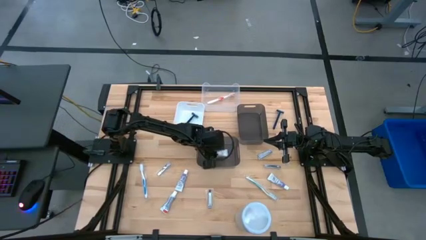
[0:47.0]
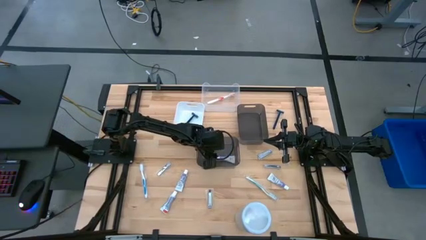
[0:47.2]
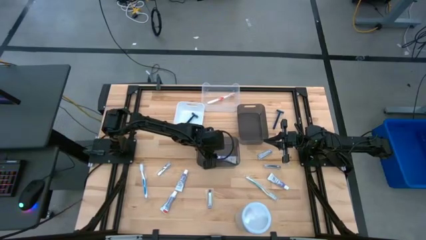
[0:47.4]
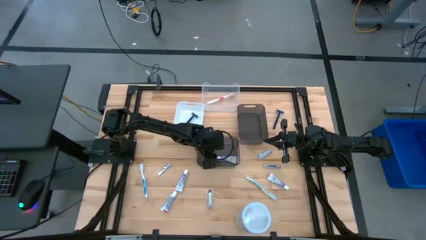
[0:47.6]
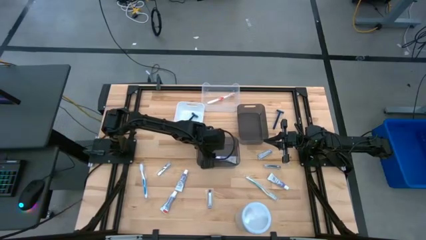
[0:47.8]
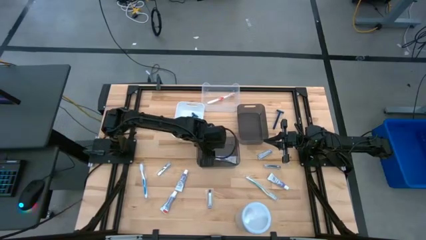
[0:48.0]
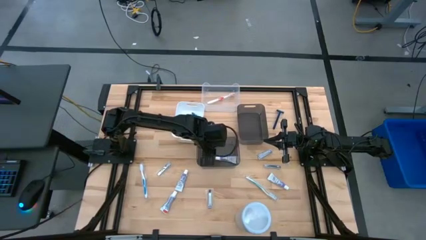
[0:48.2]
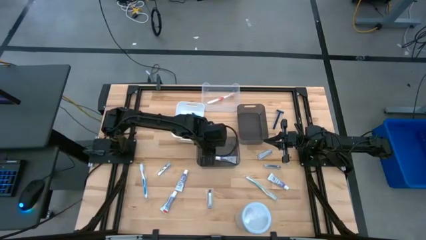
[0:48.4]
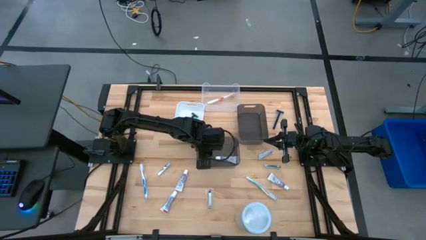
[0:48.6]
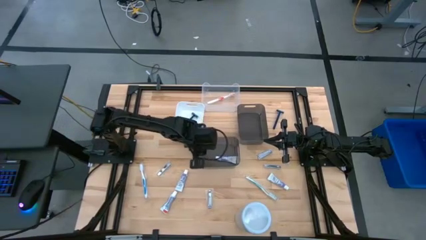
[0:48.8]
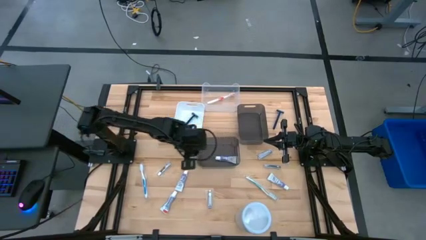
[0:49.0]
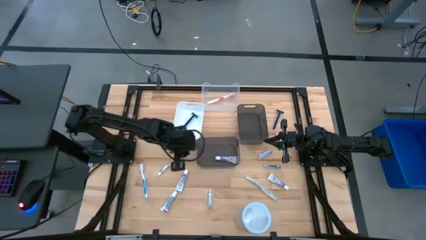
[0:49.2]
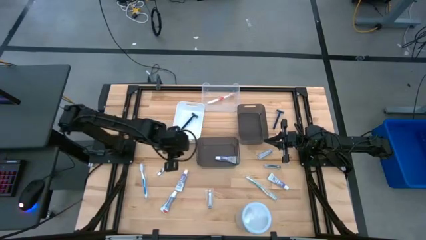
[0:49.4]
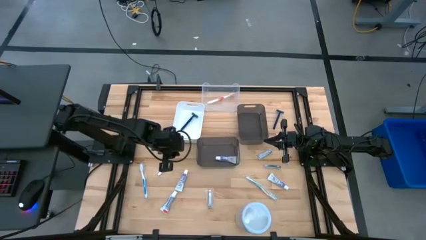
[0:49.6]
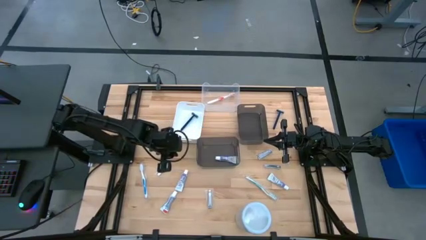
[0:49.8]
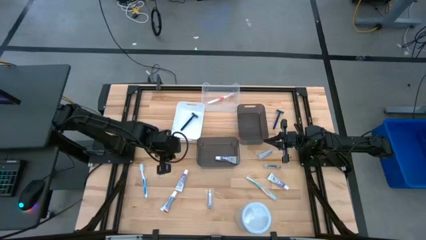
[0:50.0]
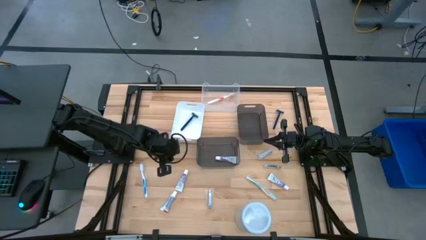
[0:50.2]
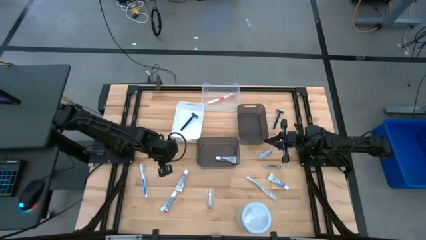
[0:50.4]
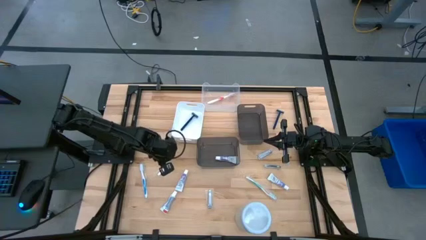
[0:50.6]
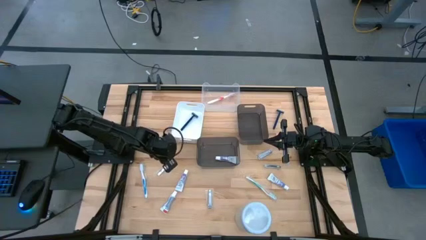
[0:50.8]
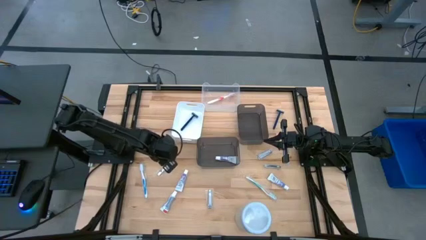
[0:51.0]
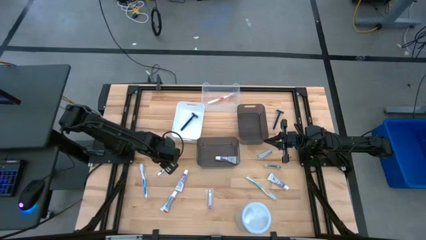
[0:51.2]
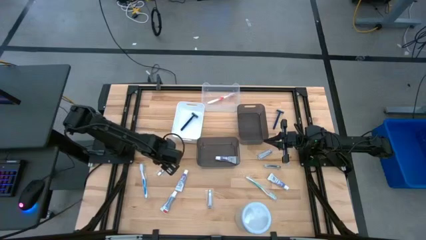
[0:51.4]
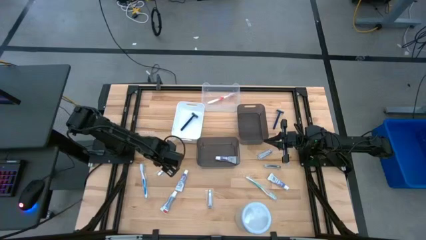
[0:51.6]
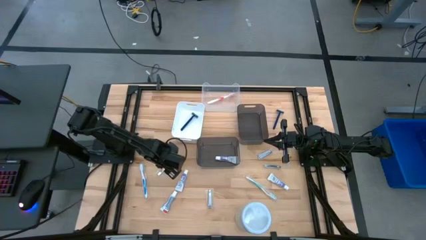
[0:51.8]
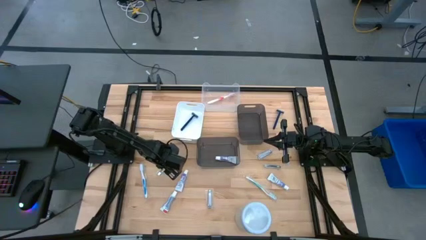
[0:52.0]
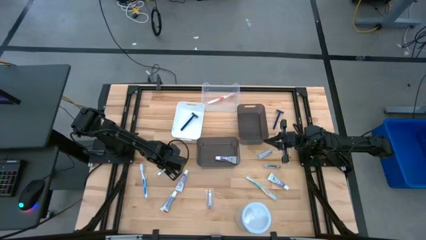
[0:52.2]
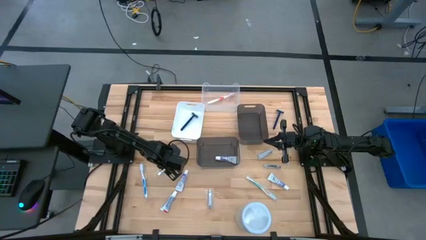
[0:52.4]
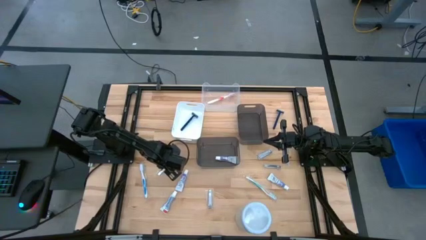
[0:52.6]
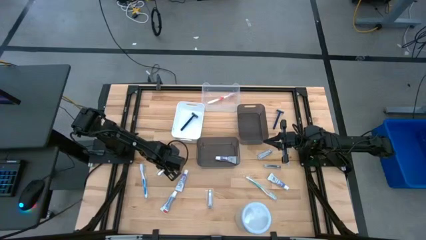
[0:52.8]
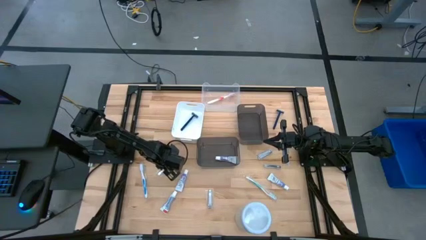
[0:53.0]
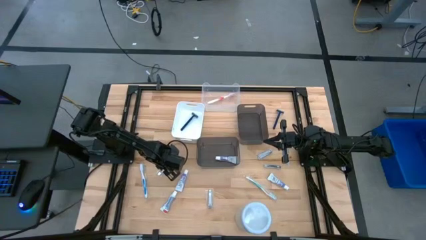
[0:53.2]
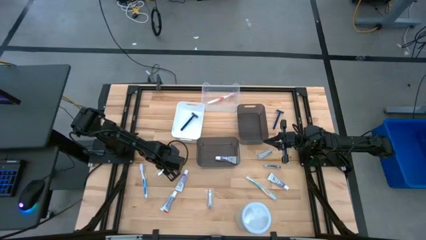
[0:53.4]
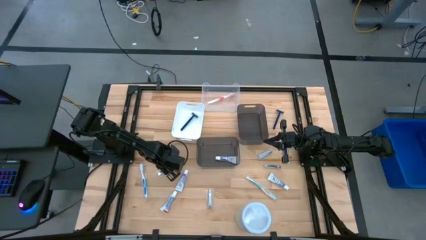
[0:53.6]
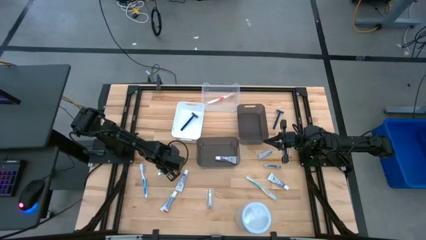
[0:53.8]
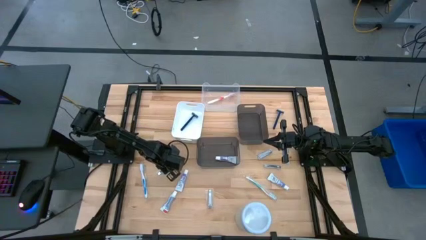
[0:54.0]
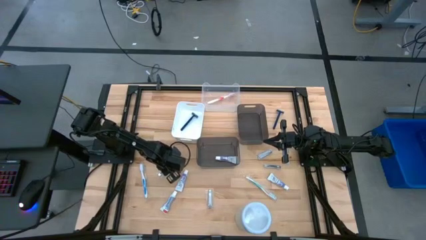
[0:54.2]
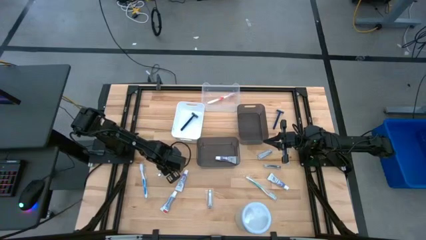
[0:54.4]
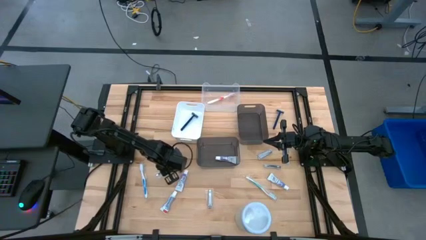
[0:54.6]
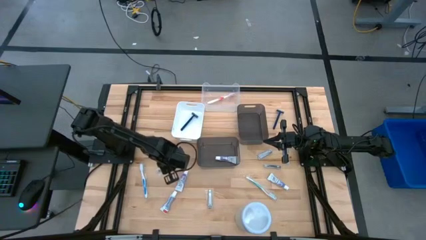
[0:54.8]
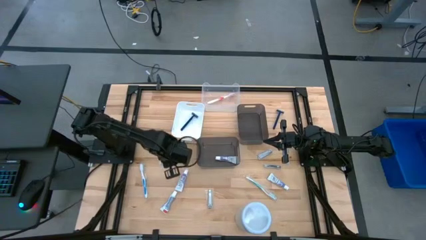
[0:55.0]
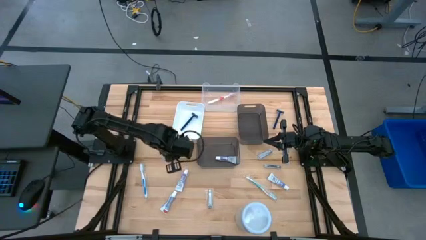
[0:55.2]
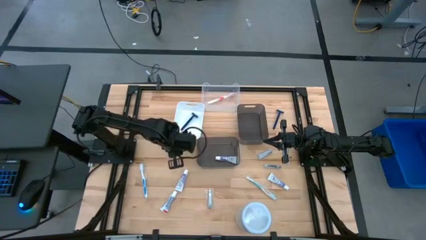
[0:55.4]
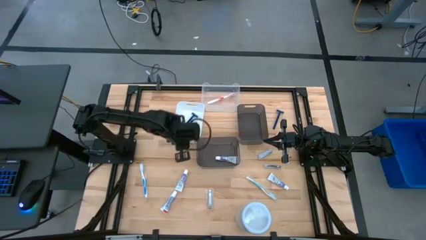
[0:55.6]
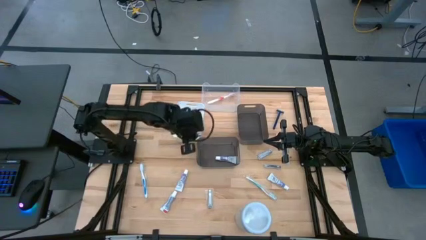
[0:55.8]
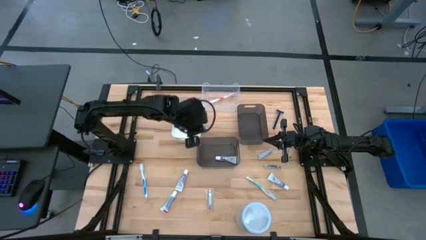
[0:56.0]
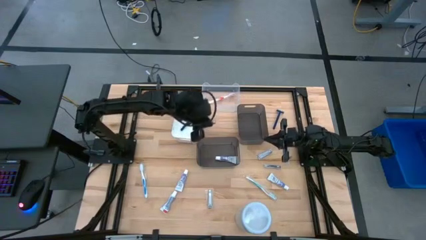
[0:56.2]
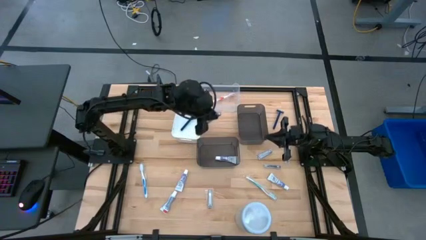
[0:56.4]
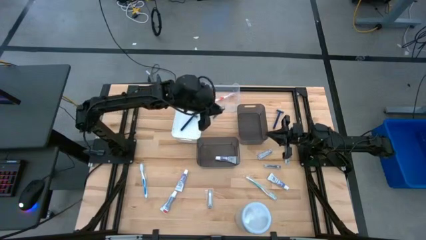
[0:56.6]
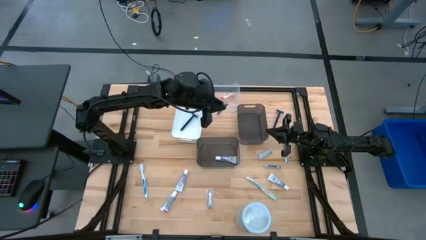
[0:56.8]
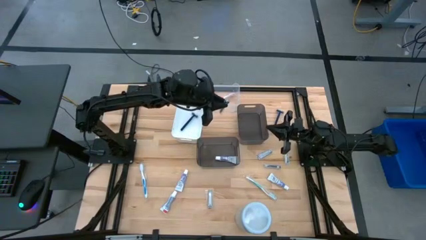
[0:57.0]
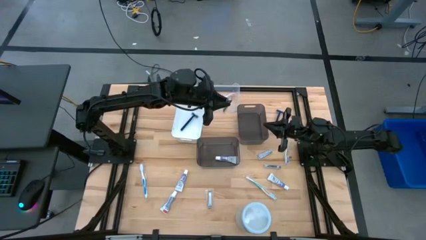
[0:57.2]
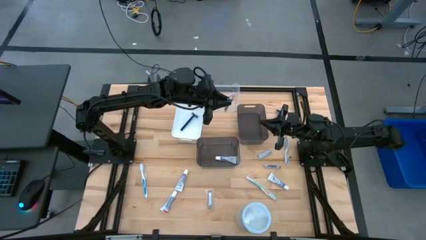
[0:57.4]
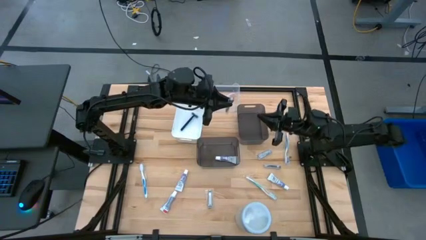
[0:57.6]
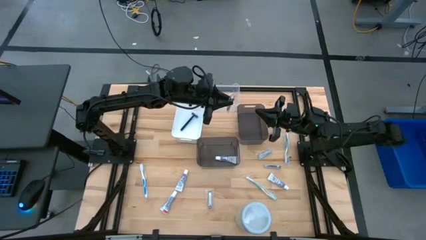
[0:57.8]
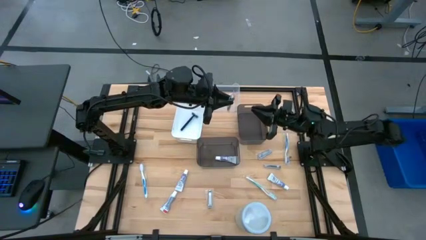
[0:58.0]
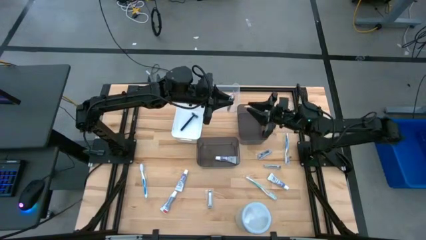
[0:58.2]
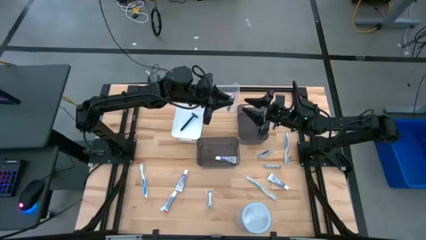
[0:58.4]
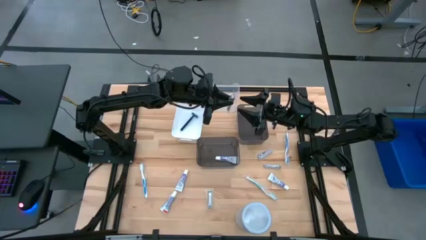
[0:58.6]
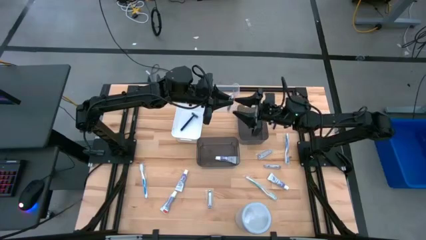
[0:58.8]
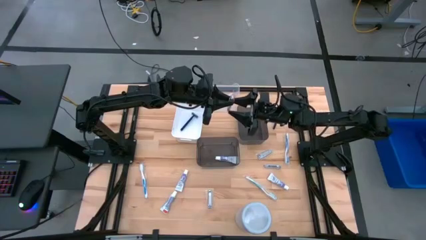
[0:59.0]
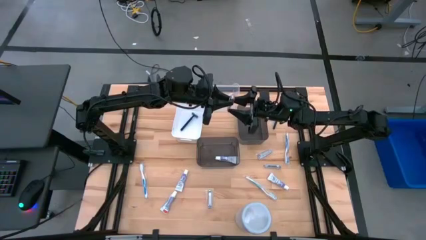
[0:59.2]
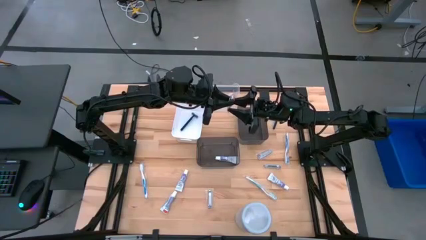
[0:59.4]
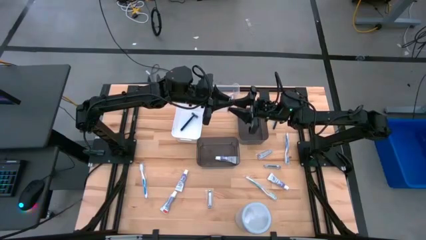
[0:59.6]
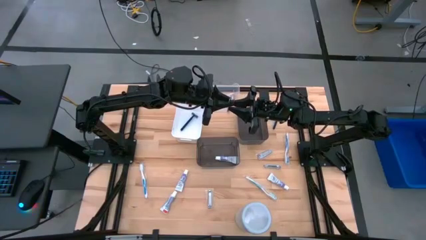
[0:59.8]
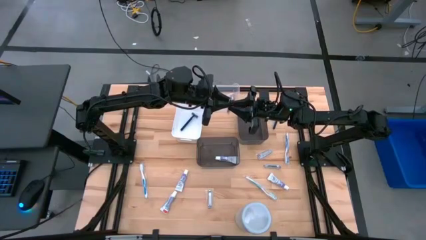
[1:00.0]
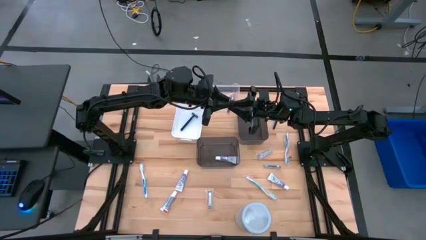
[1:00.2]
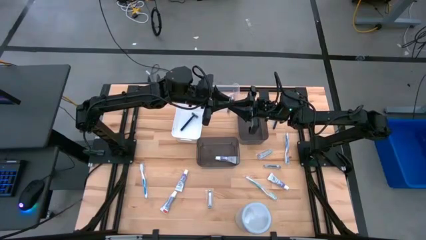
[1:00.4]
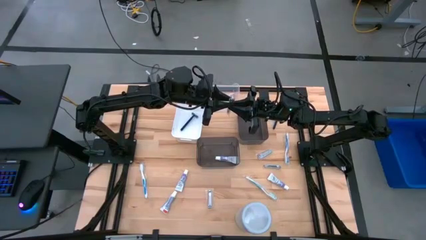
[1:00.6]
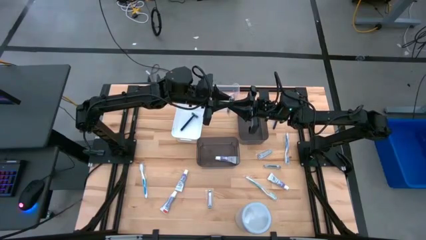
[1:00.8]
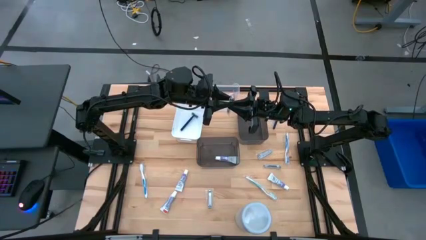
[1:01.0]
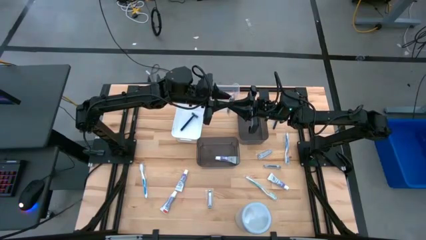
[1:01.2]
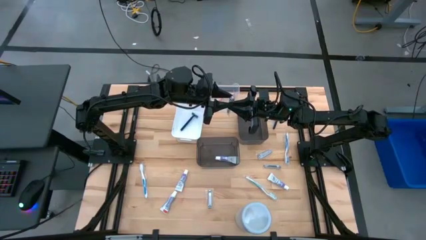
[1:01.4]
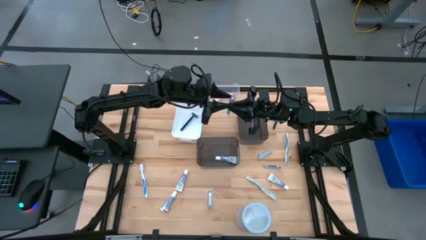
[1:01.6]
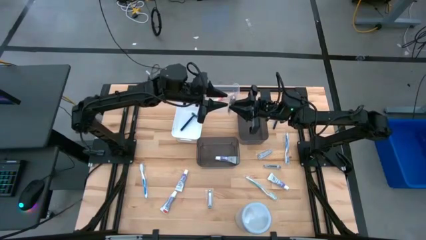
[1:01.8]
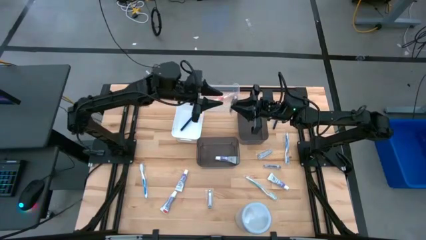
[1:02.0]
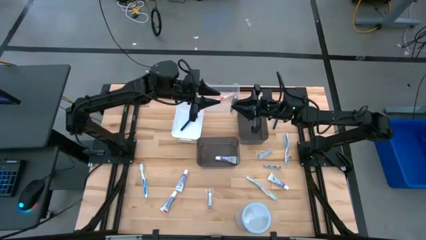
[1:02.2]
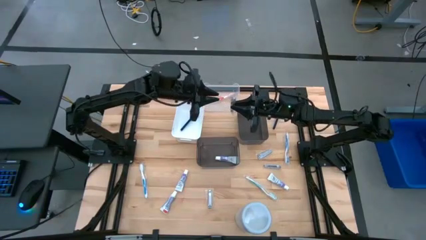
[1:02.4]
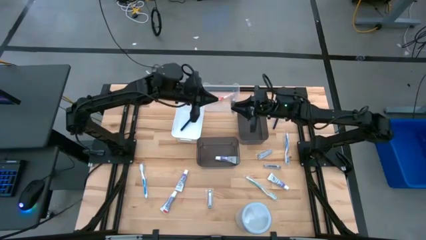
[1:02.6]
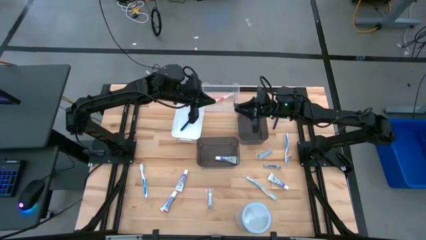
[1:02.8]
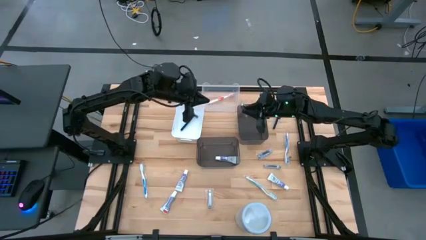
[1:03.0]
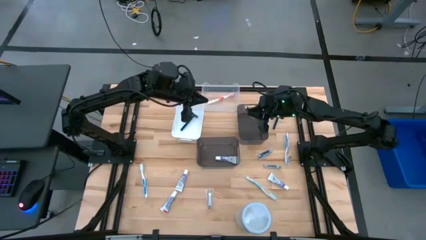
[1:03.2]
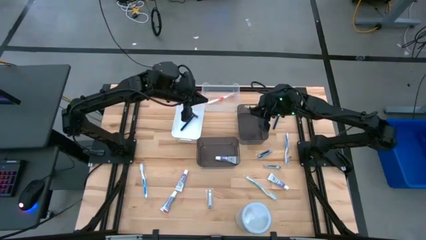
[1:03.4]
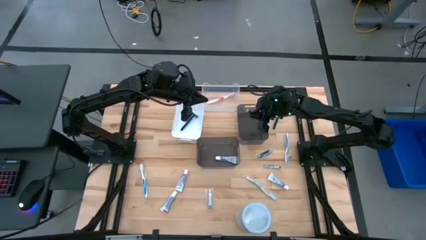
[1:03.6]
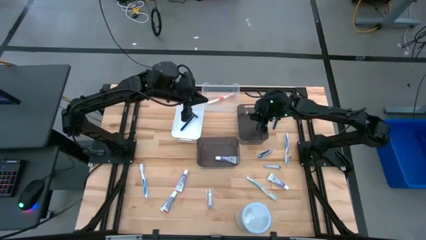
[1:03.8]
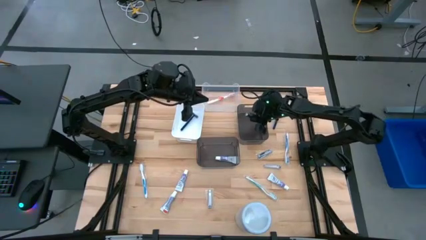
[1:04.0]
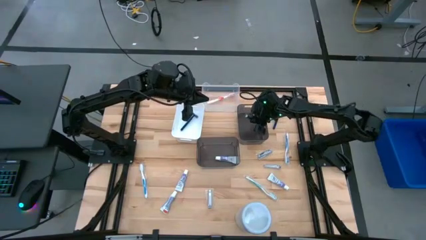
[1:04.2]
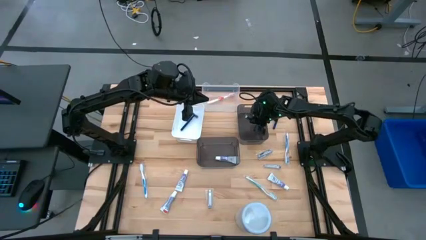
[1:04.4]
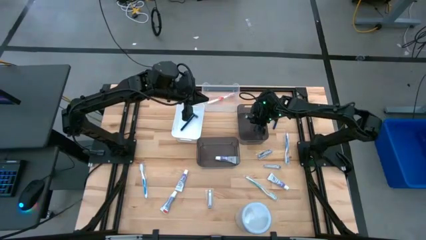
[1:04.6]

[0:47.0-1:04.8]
Task: Pick & Place Travel size toiletries
Put the silver nail cutter into the top black bin
